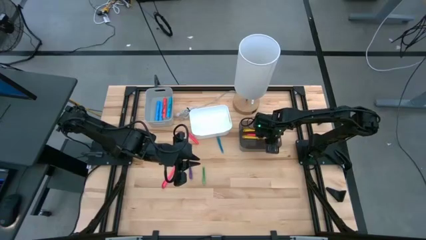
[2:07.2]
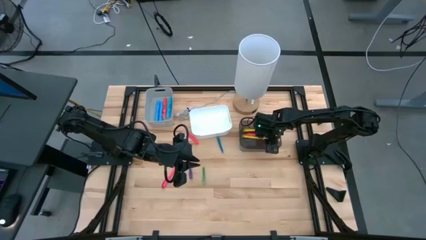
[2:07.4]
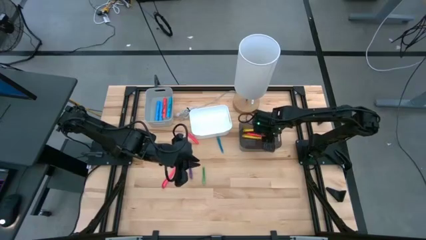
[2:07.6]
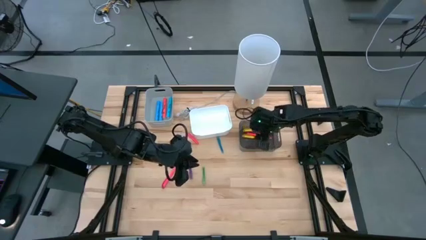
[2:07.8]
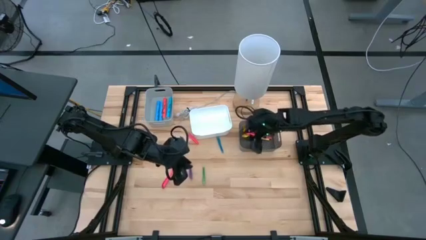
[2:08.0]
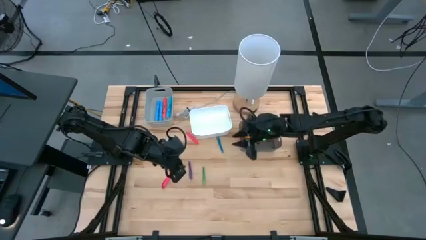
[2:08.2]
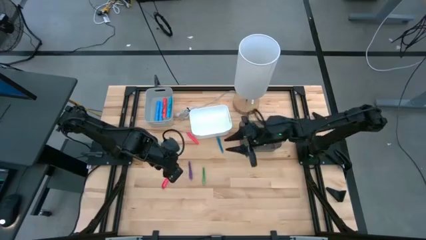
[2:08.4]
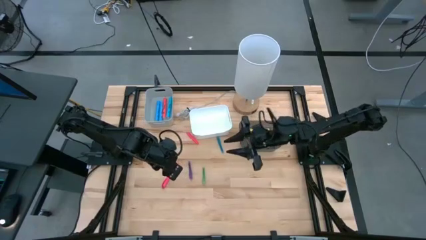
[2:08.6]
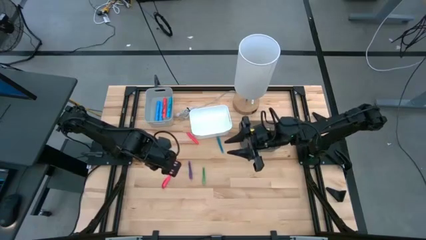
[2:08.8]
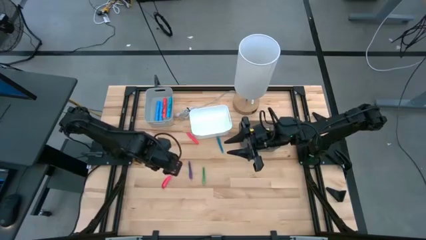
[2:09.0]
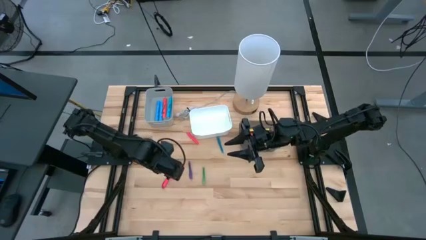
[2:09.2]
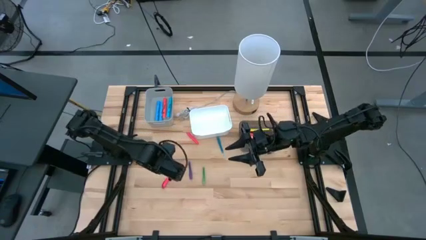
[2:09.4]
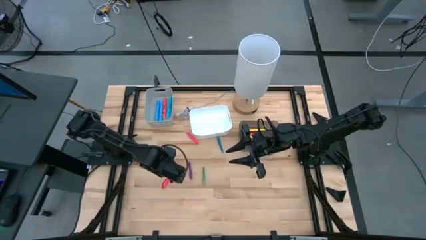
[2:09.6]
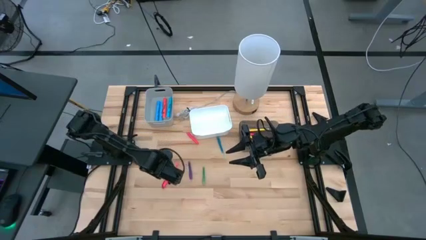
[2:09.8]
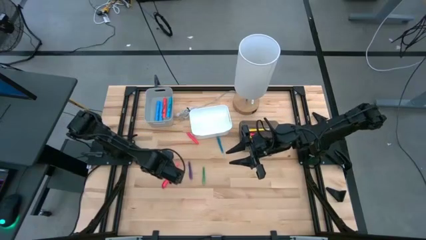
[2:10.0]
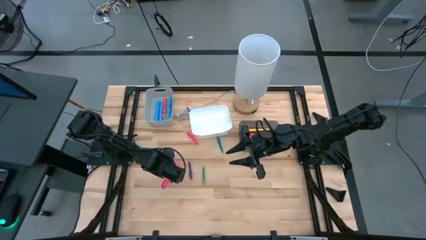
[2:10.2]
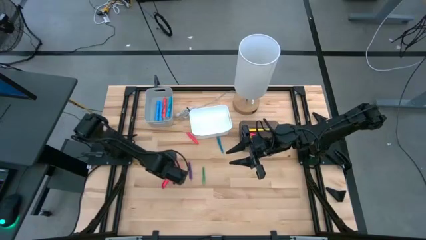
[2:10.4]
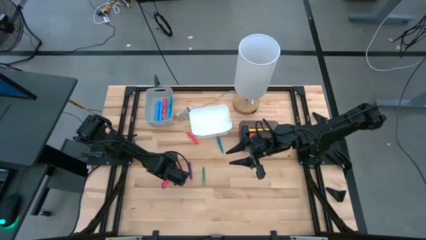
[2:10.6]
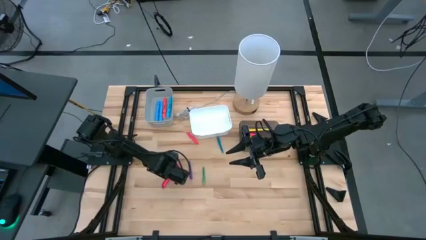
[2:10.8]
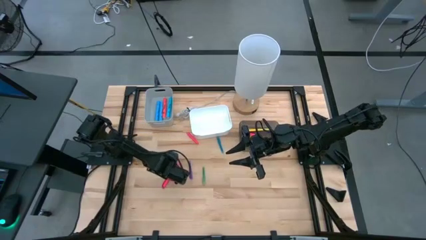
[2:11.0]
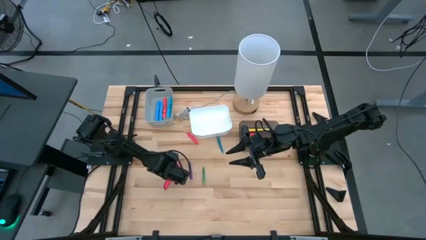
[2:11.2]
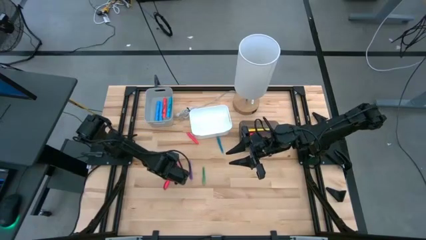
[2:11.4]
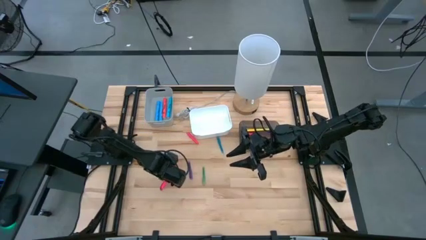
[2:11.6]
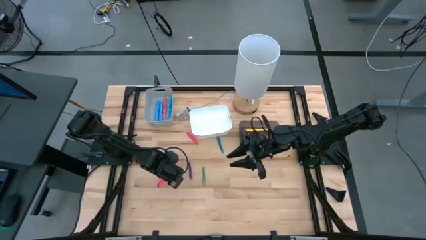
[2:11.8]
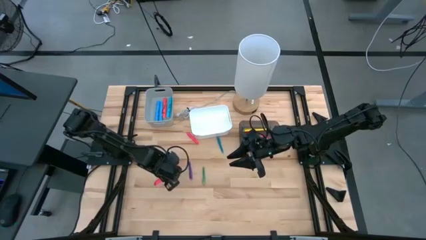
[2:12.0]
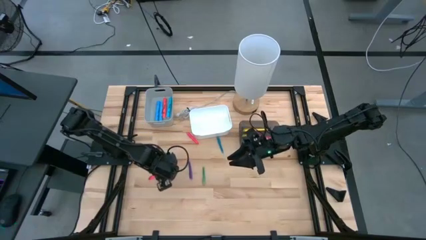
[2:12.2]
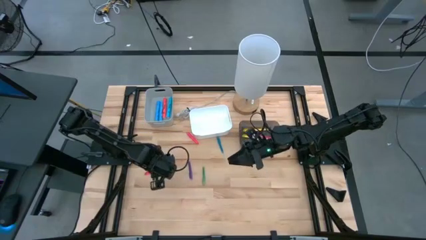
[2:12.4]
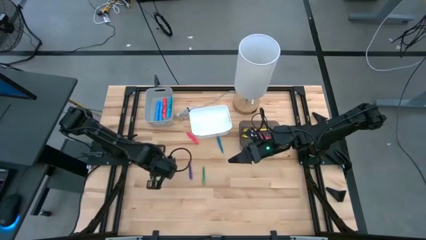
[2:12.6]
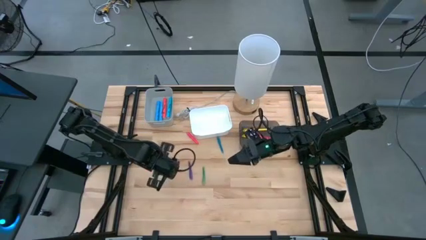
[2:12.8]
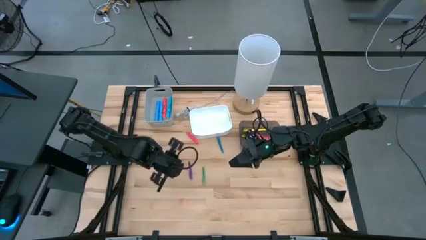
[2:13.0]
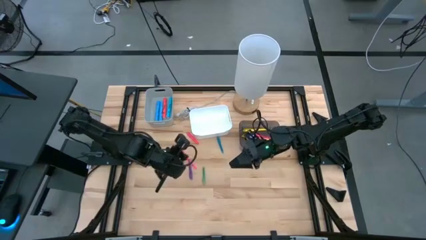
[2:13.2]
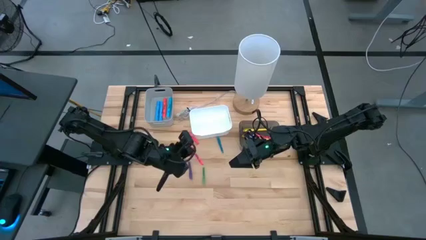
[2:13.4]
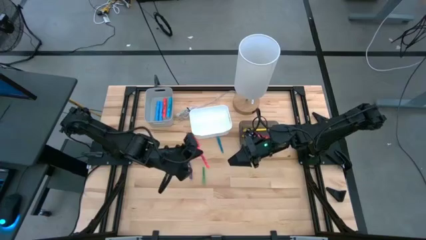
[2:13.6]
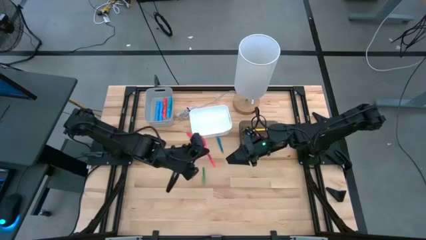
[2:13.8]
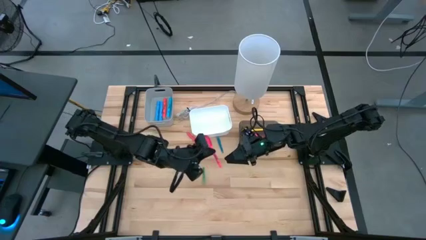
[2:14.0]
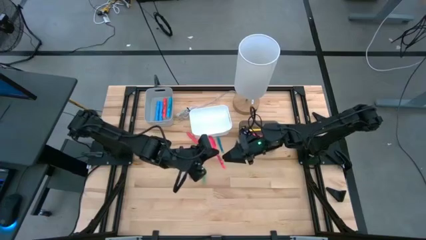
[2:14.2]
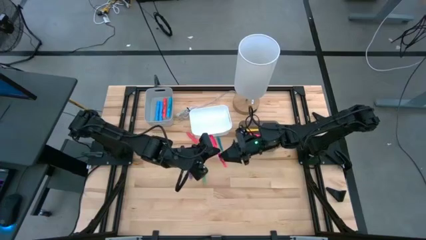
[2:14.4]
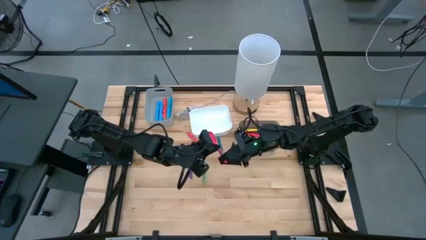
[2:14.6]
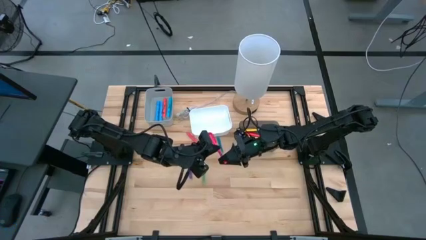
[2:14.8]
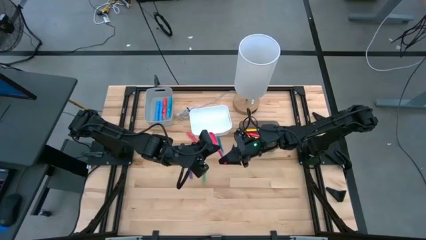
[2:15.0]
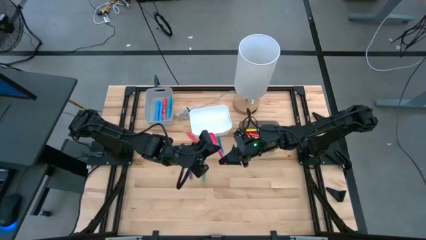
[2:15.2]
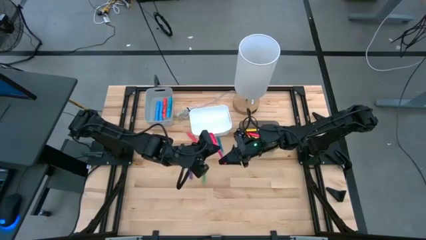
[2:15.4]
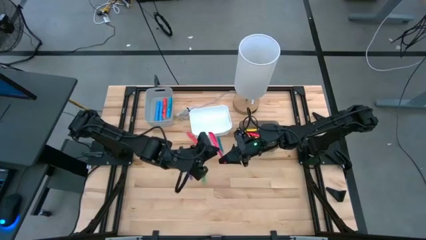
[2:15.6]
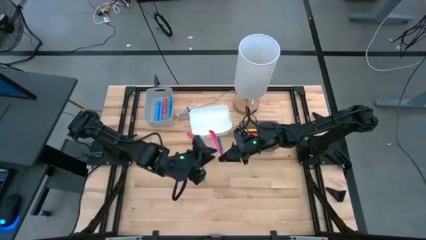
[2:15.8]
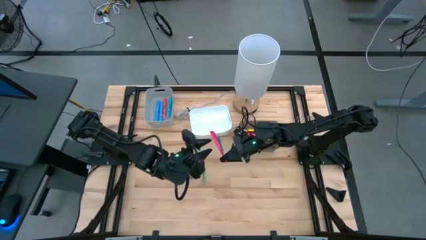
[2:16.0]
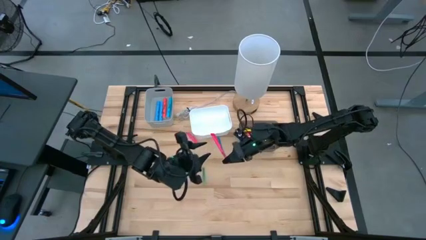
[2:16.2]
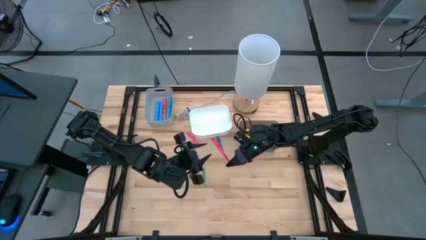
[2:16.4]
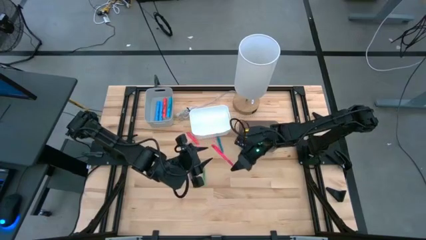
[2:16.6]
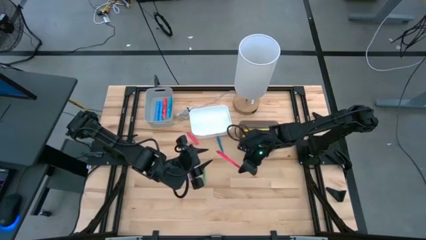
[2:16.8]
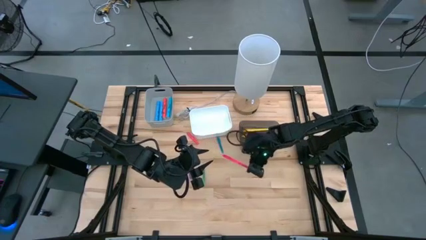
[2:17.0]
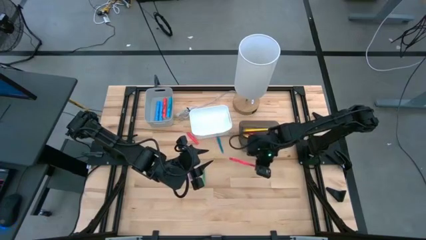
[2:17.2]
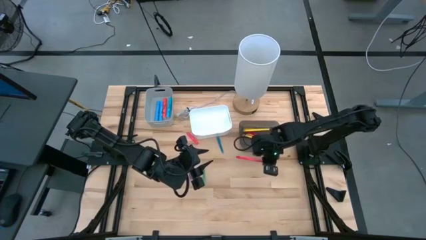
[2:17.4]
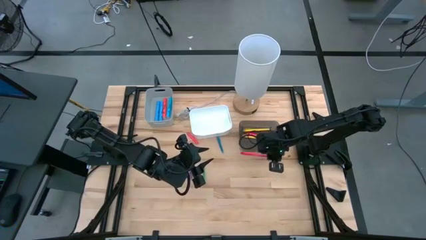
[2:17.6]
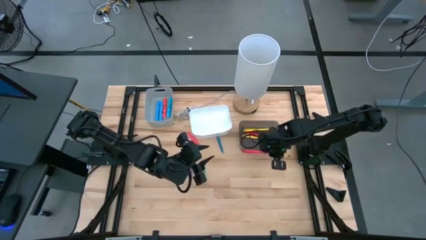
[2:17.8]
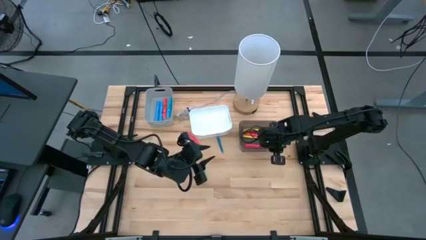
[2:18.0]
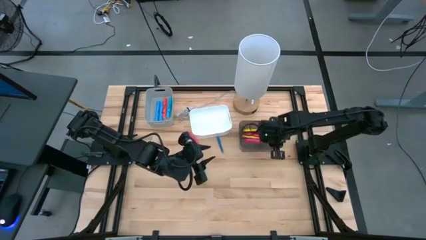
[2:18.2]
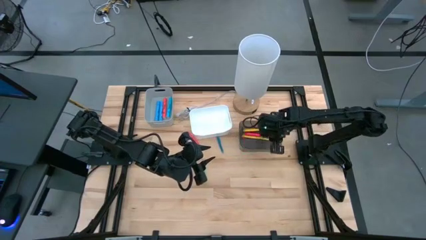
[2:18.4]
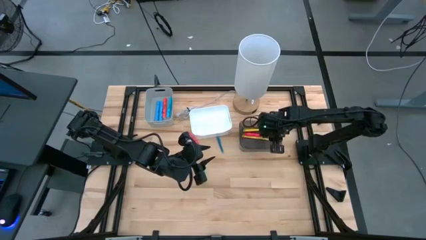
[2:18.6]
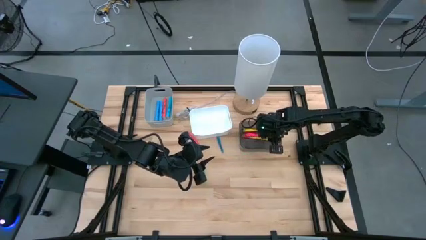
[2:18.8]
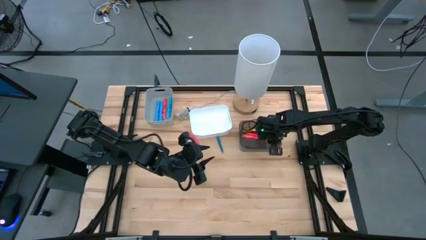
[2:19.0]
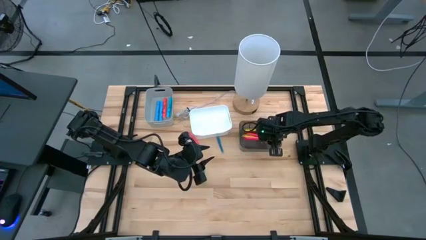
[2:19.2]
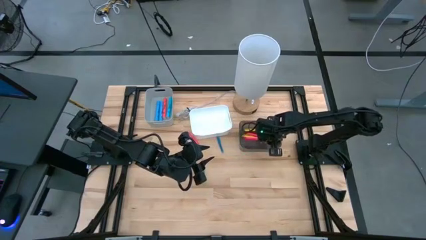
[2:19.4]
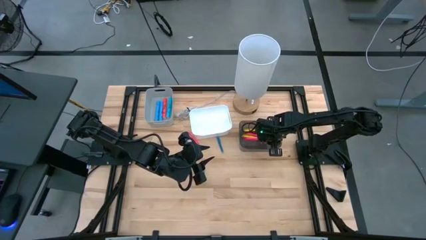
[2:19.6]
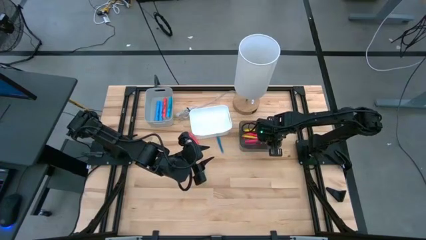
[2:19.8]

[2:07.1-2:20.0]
Task: Pick & Place Markers
Put the pink pen into the black transparent bin
